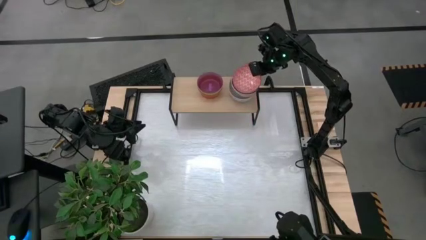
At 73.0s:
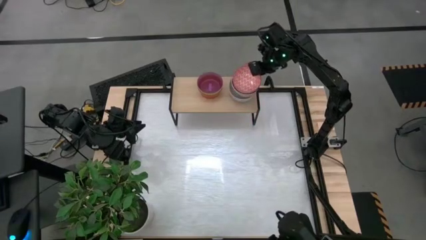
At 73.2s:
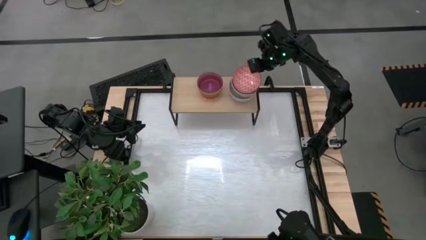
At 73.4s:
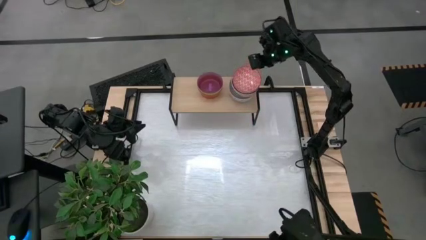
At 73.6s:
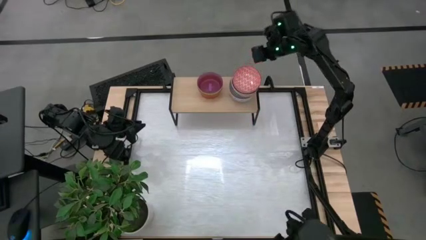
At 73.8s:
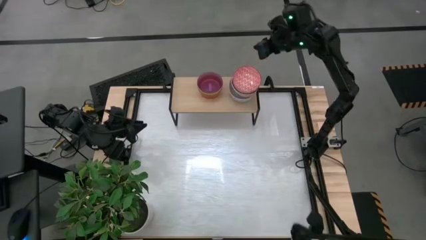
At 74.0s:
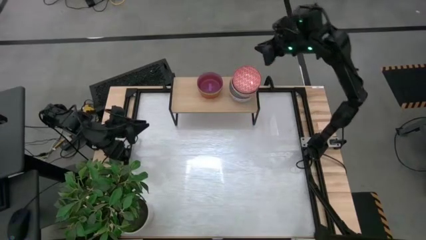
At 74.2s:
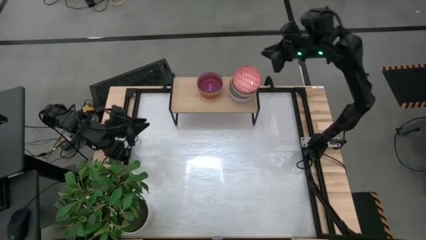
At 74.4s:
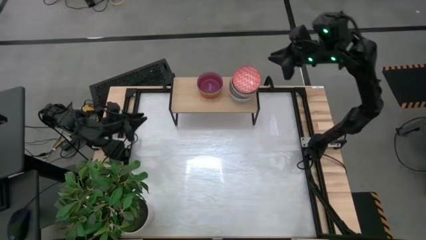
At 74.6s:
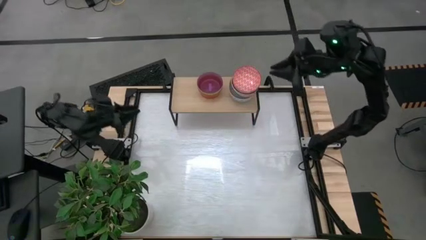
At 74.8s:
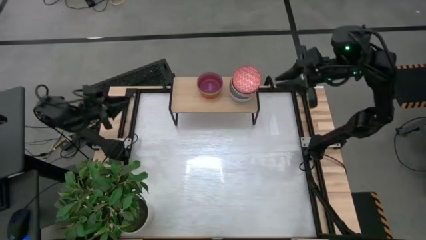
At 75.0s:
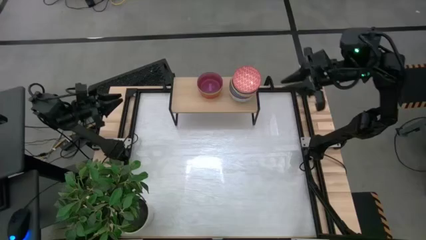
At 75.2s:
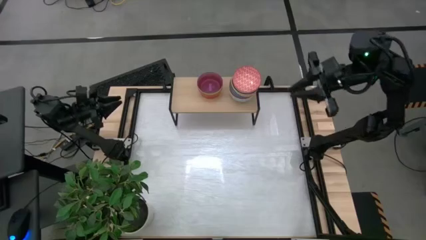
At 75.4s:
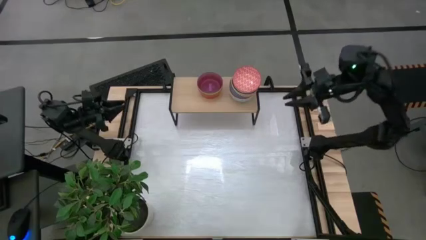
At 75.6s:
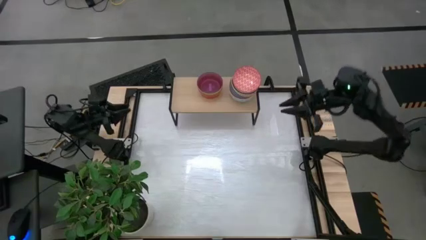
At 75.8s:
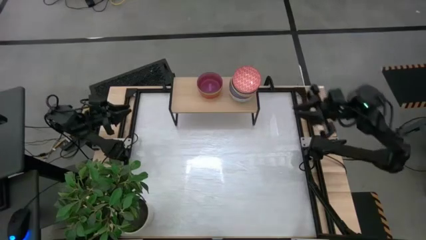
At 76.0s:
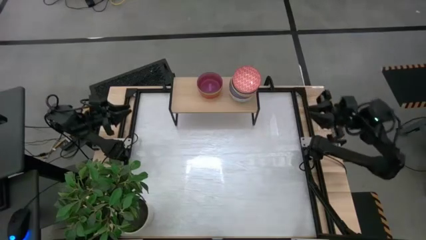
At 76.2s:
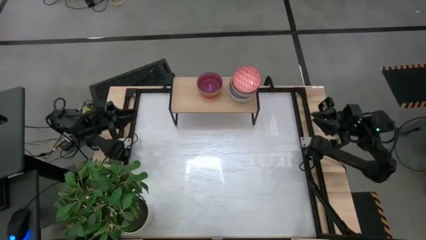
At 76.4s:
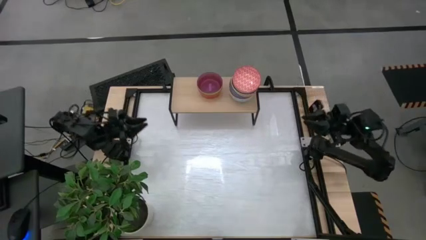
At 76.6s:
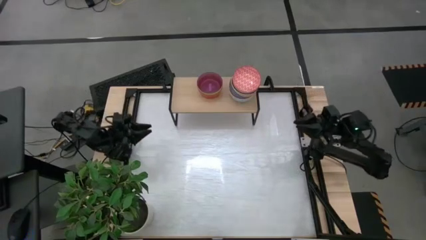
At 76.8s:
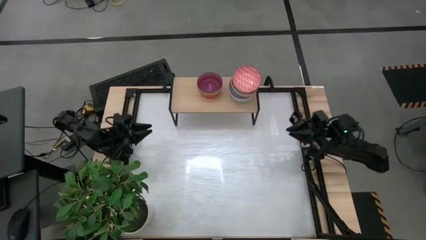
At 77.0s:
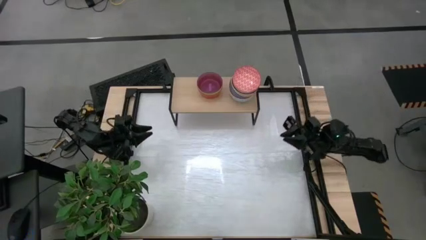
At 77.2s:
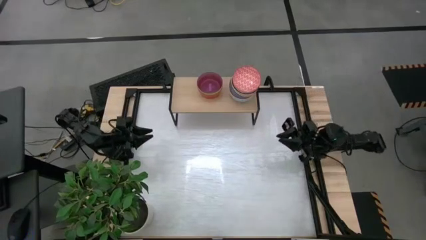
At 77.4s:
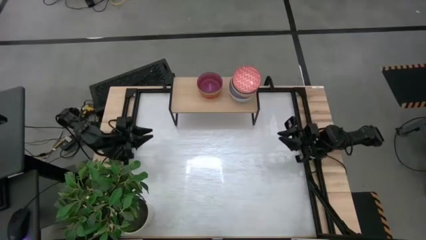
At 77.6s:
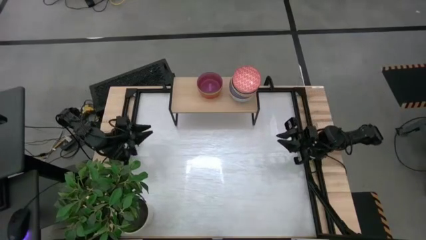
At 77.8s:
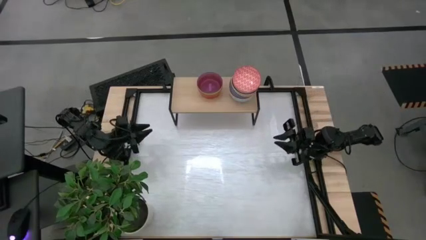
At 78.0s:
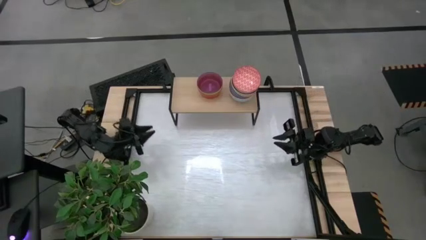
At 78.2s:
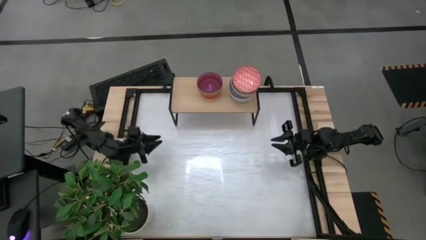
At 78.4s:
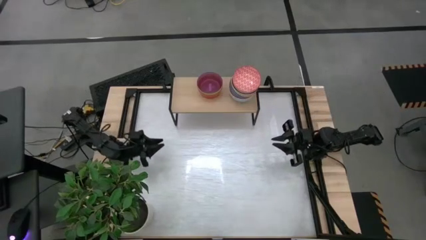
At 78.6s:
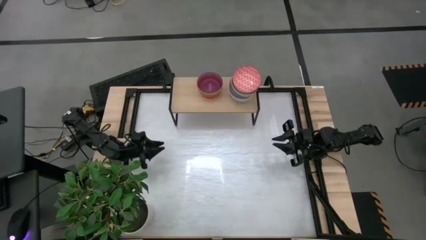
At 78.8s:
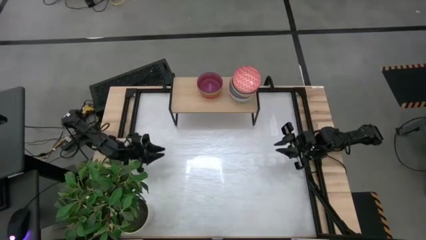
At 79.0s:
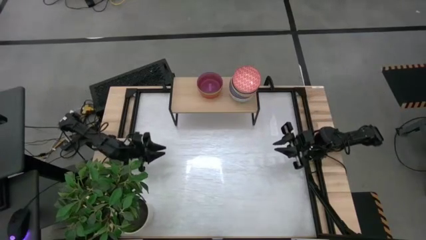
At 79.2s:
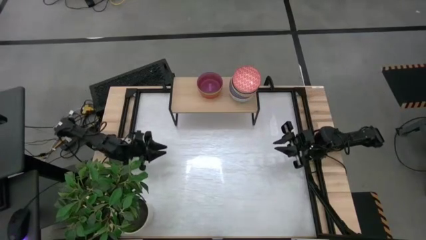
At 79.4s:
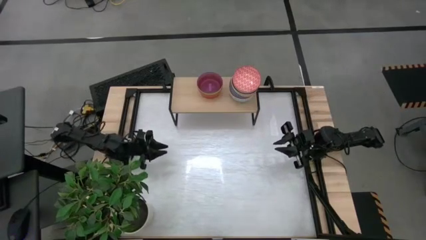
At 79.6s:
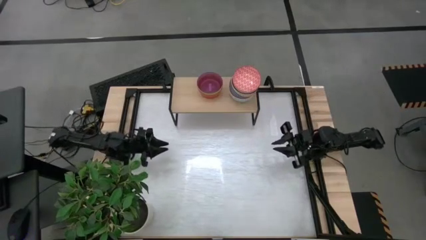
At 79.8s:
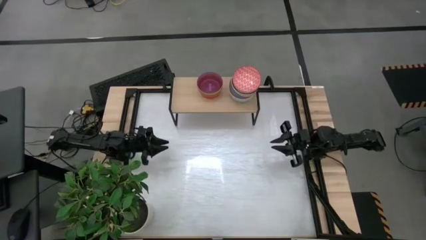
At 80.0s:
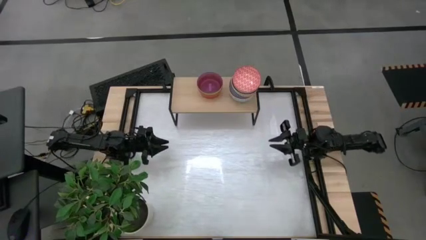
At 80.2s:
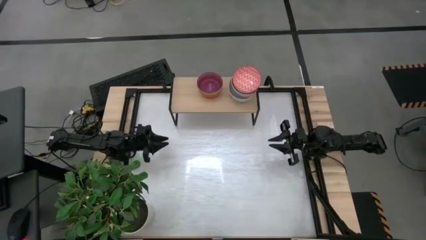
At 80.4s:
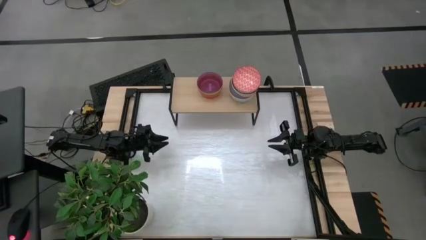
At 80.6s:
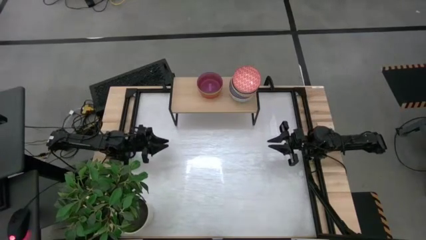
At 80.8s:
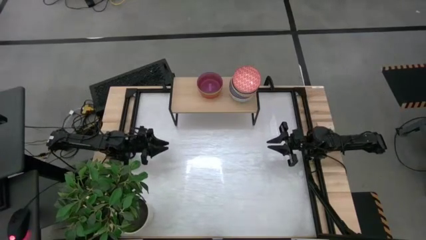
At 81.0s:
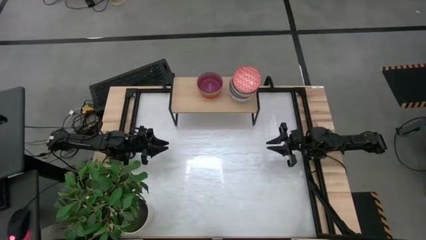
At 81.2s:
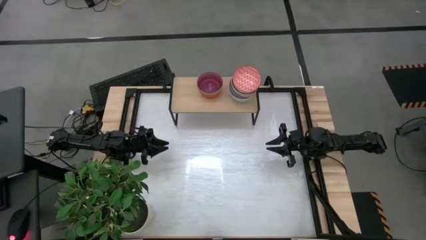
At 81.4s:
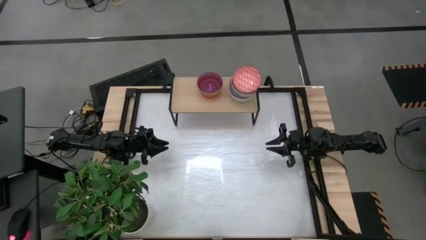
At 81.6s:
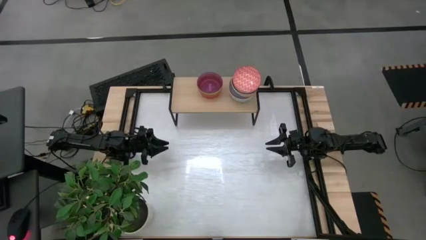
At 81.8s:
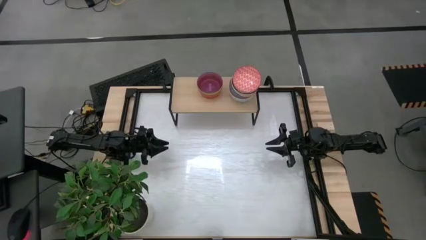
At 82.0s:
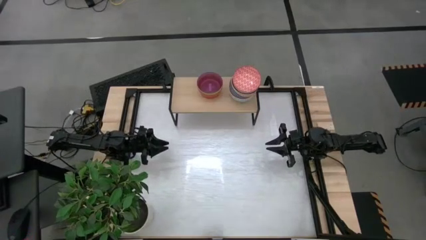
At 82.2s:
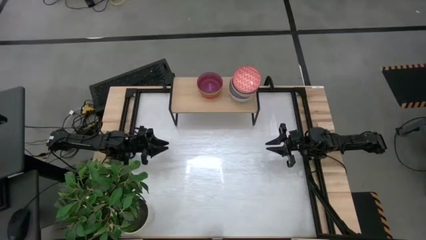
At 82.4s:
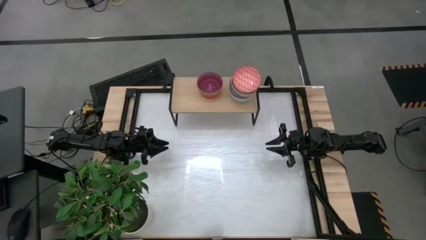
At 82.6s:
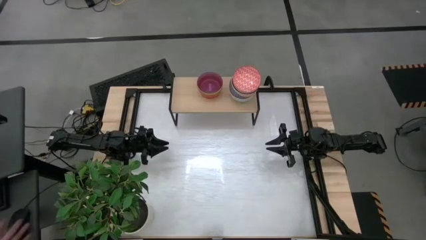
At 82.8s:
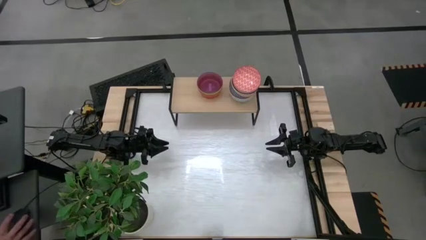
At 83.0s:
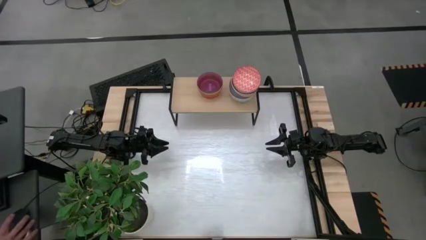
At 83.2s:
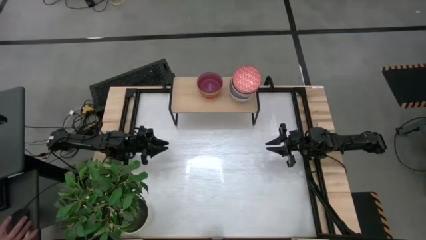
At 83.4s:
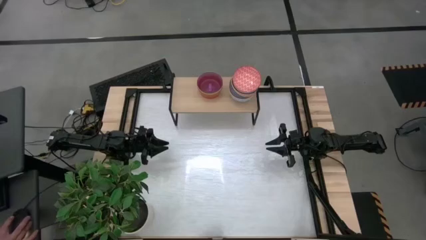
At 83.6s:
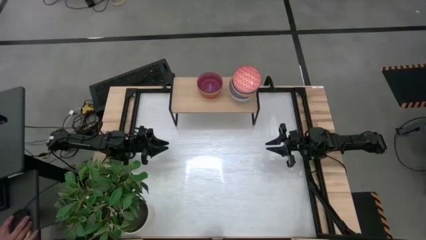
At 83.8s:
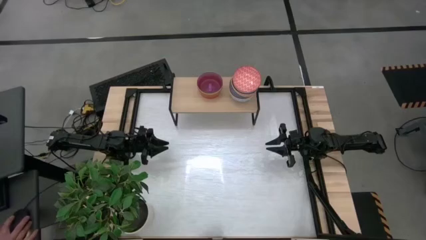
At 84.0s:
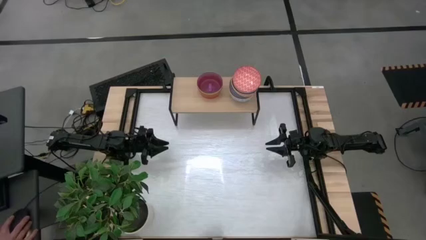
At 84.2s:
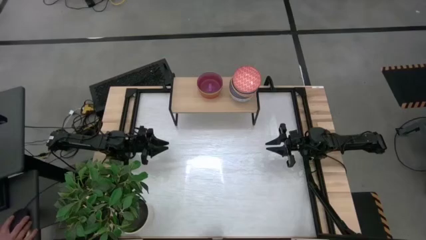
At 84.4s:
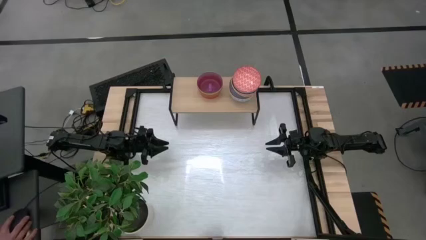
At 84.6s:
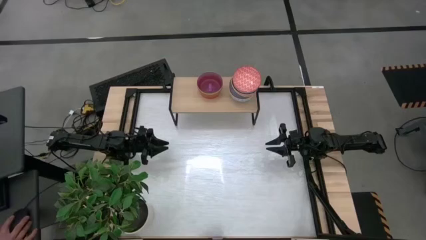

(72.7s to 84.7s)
Task: Place and stack bowls onto a shelf
Return to Home Position

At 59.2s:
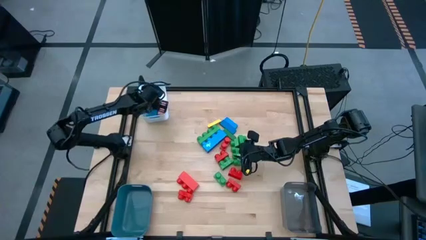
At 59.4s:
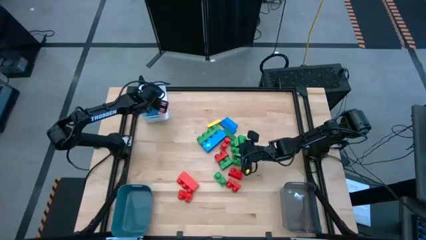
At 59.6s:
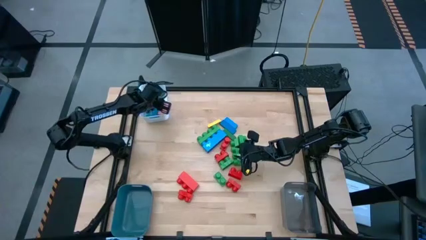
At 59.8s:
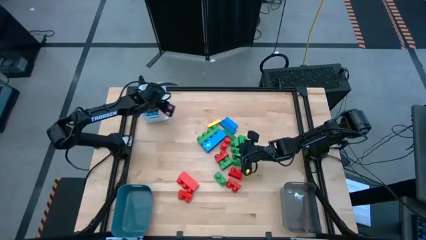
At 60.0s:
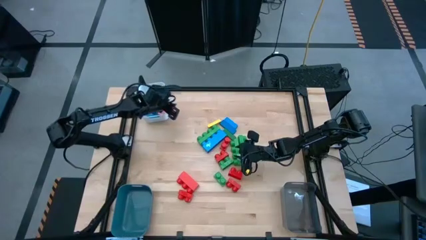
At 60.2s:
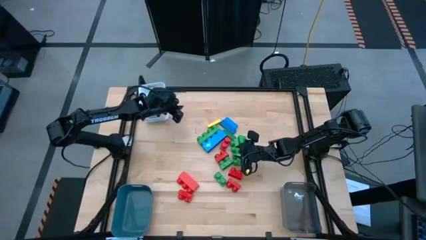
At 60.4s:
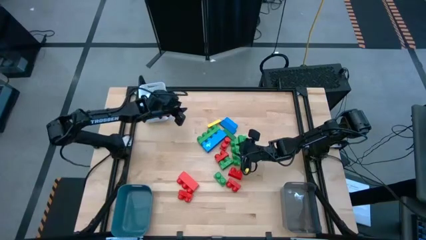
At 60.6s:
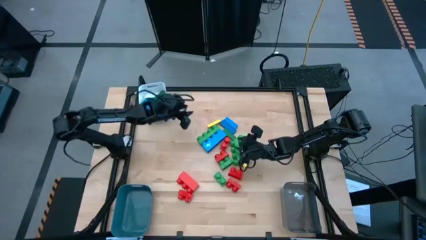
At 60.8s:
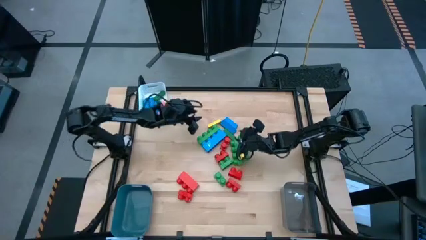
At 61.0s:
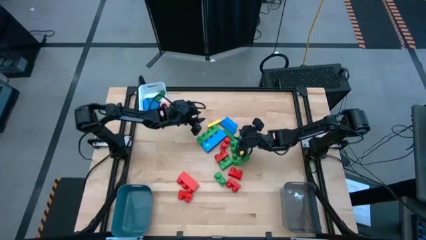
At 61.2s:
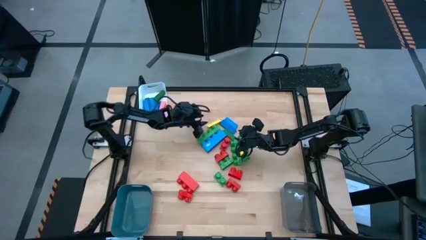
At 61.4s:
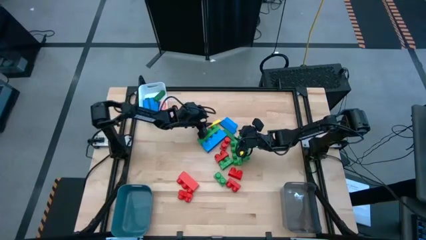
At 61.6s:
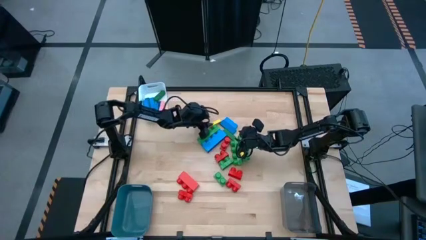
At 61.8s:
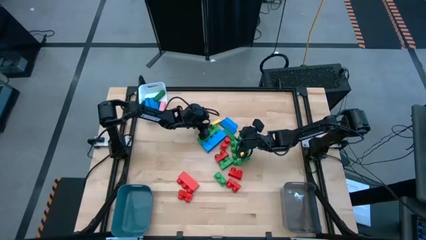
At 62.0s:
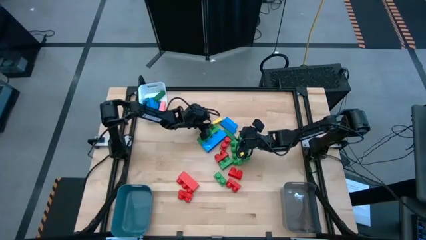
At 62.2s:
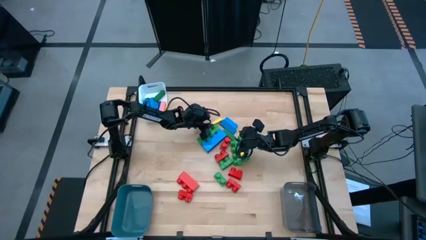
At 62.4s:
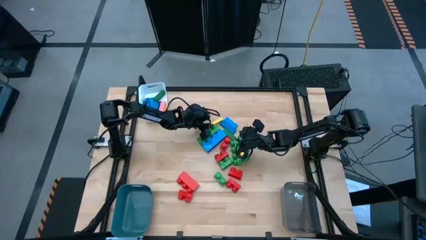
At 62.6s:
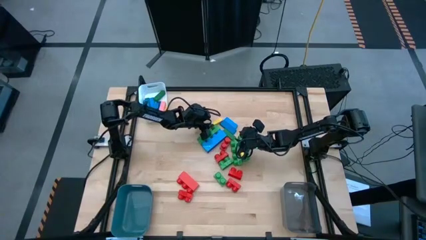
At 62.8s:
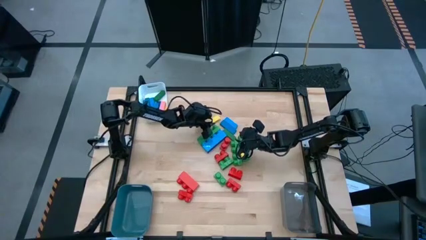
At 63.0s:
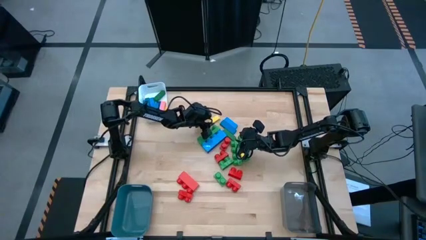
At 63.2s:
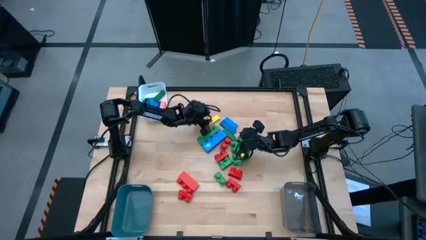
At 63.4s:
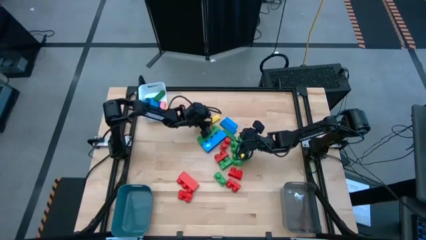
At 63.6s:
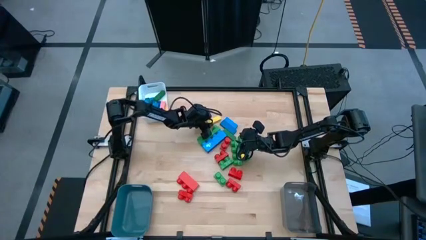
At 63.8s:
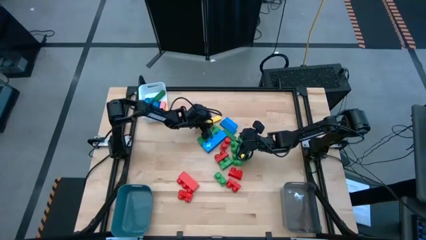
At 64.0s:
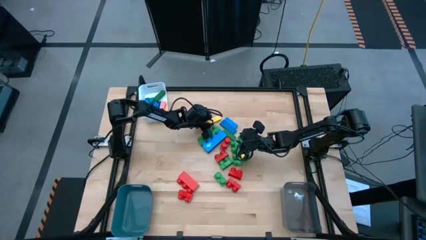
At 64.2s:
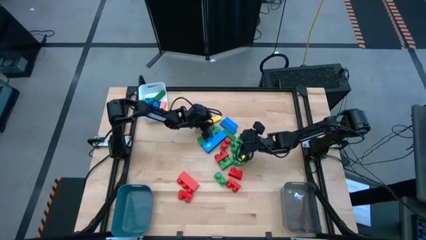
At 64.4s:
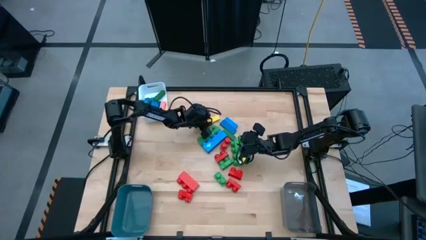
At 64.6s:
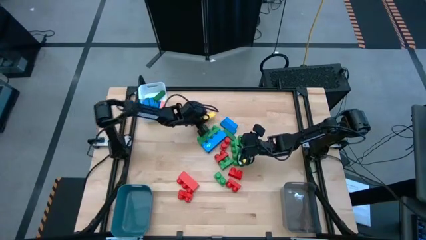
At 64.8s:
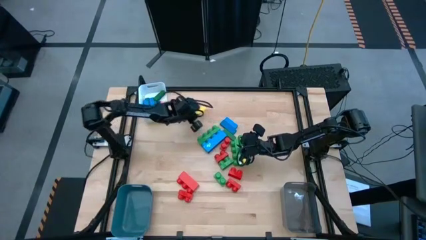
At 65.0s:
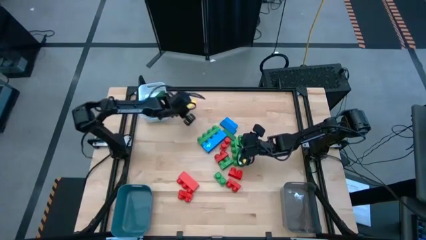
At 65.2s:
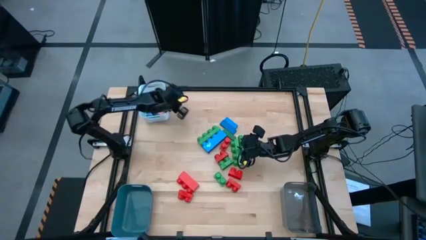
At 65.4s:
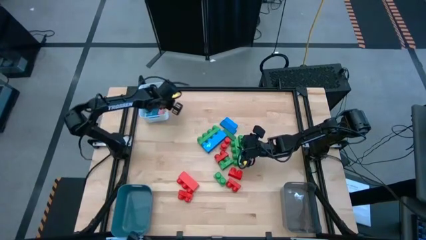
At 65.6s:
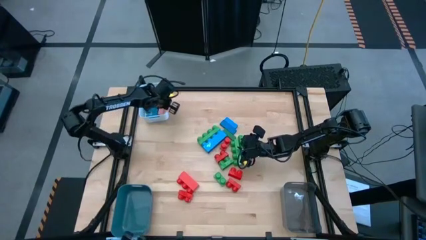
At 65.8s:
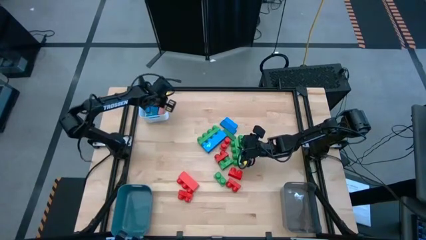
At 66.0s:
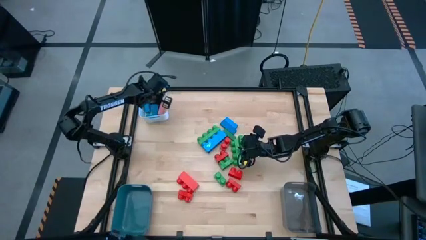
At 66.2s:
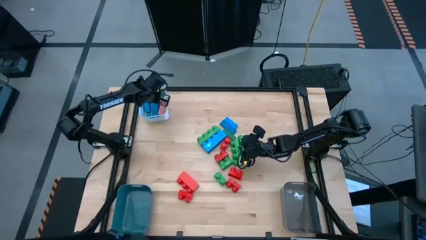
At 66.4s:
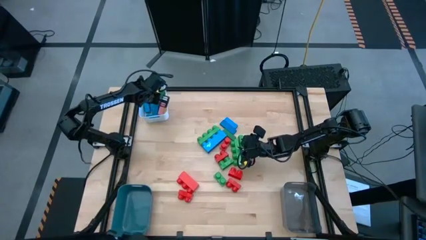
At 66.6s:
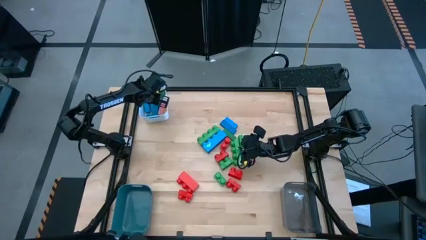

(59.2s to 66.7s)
Task: Sort blocks by size
Put the yellow block into the white bin
